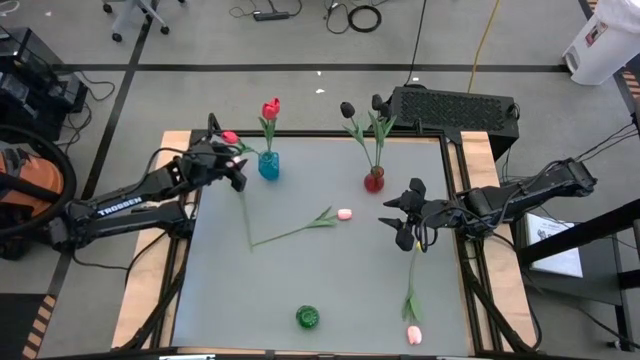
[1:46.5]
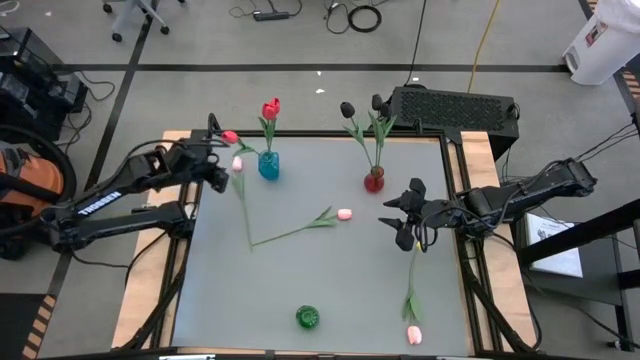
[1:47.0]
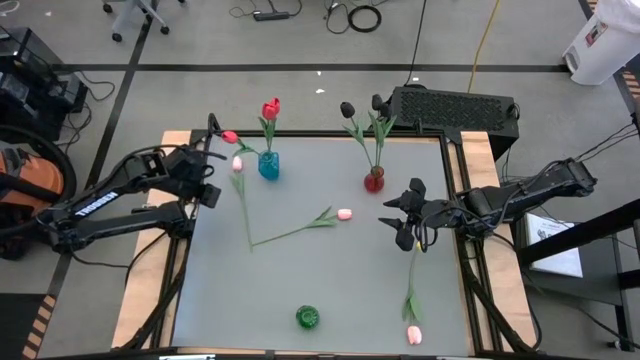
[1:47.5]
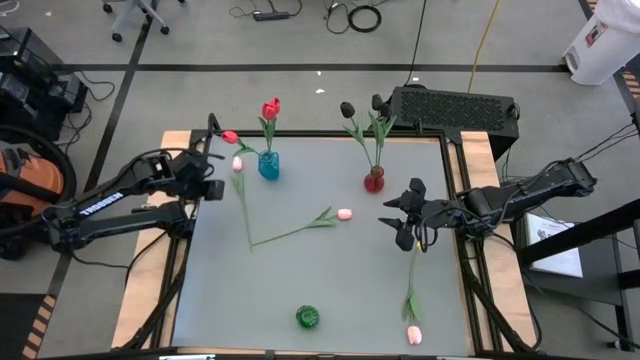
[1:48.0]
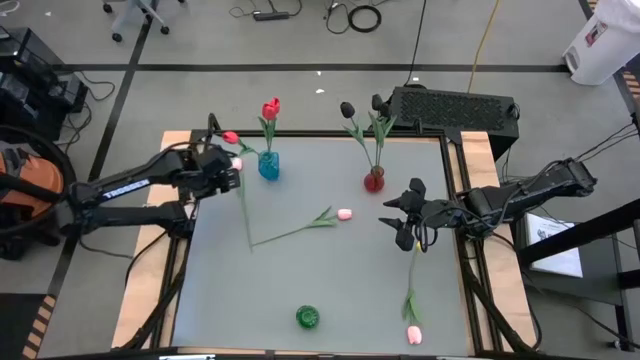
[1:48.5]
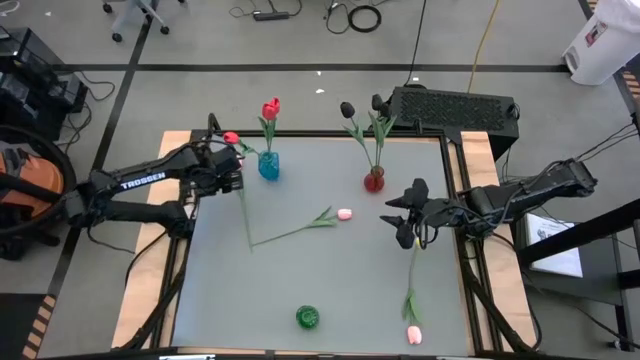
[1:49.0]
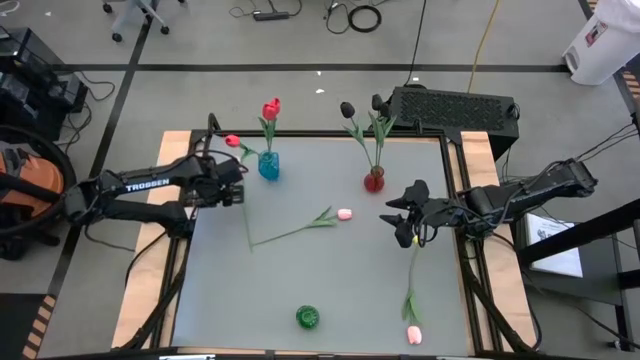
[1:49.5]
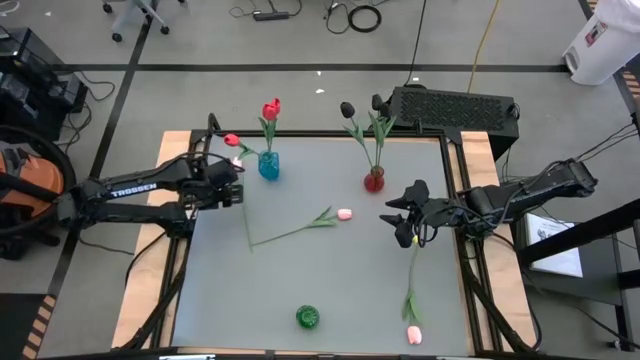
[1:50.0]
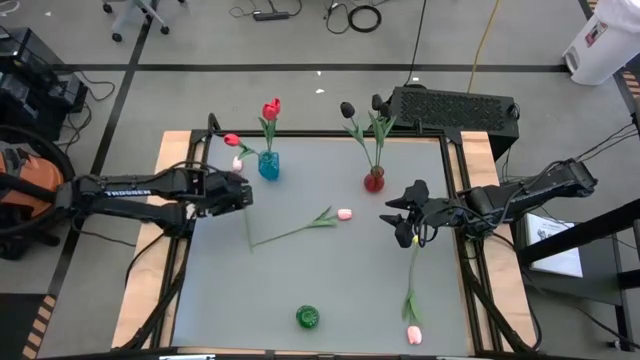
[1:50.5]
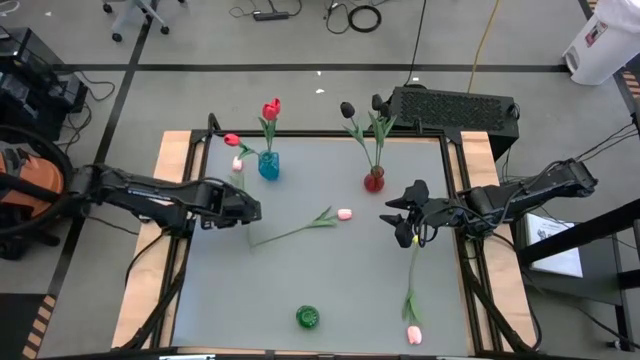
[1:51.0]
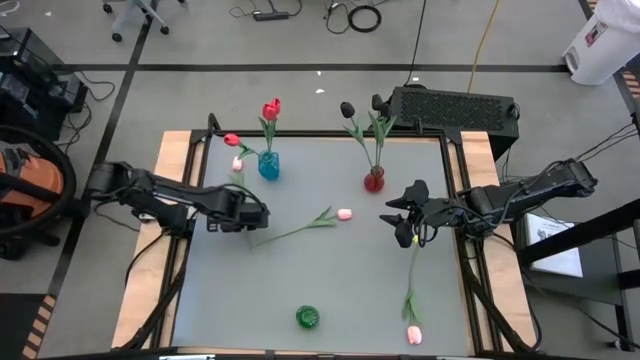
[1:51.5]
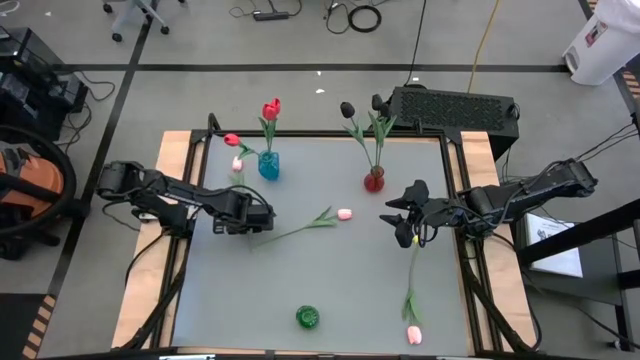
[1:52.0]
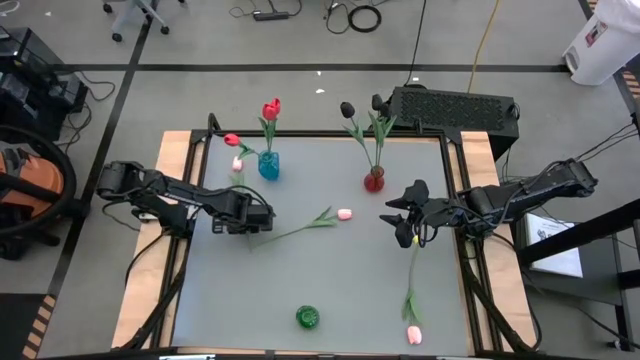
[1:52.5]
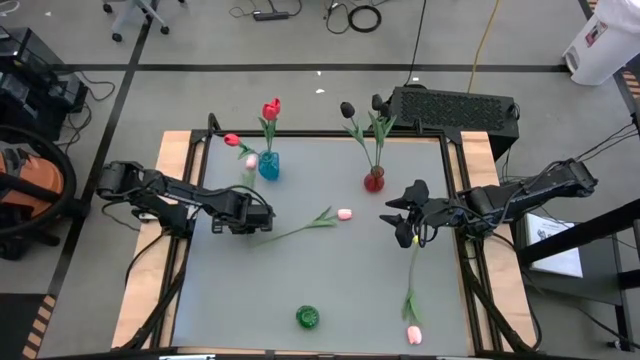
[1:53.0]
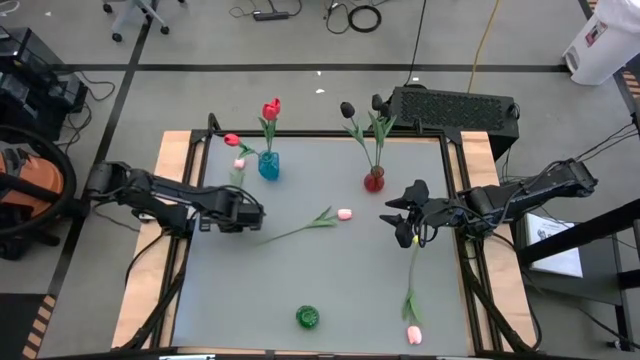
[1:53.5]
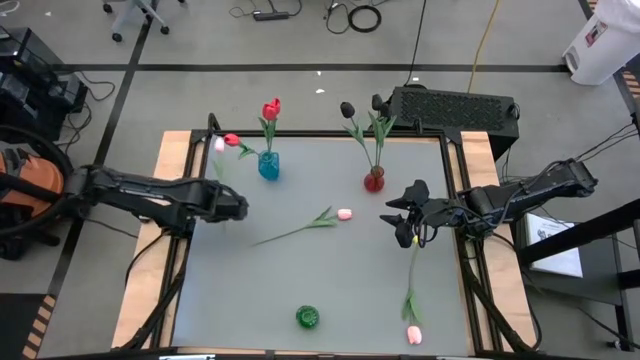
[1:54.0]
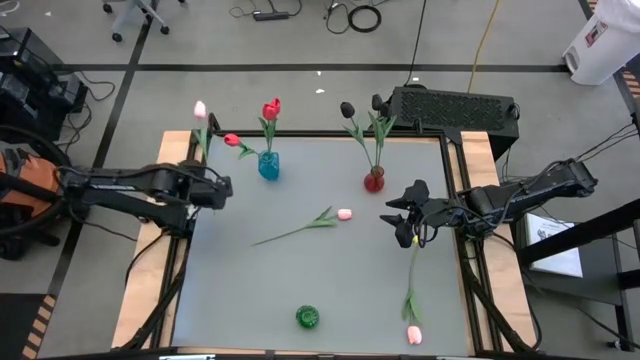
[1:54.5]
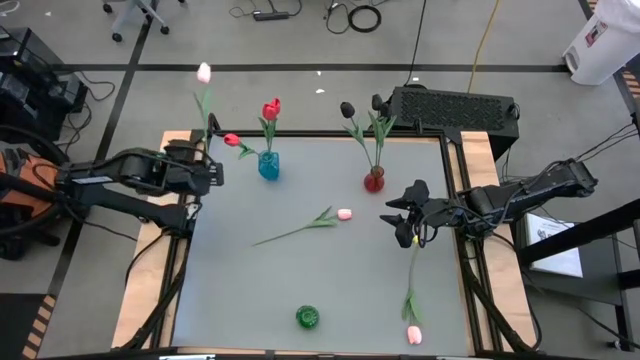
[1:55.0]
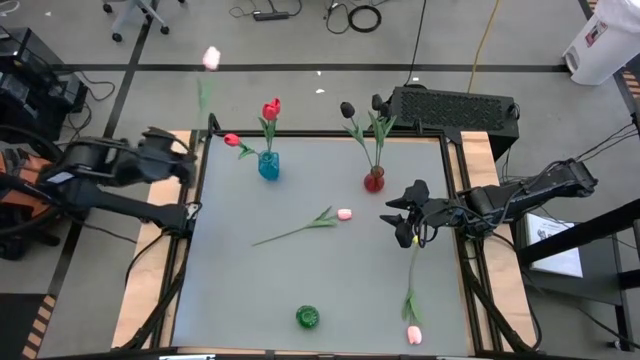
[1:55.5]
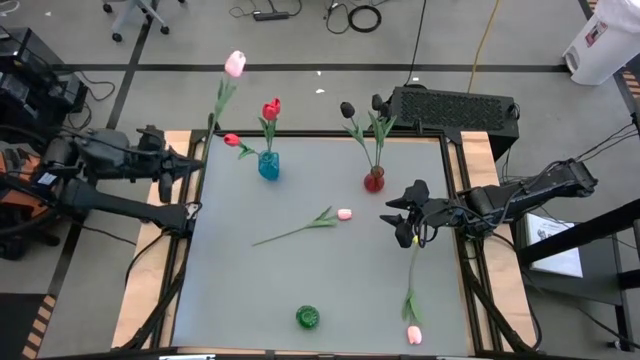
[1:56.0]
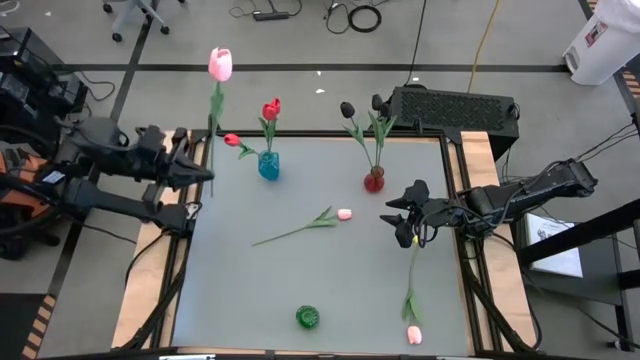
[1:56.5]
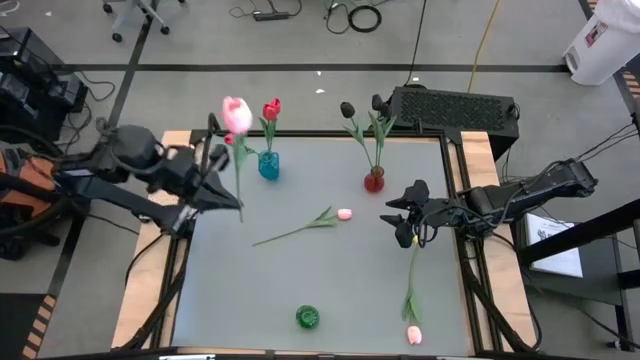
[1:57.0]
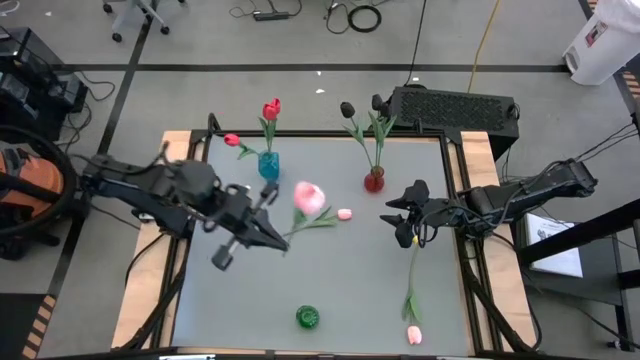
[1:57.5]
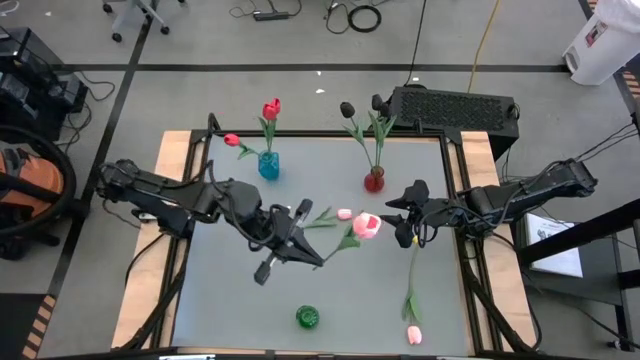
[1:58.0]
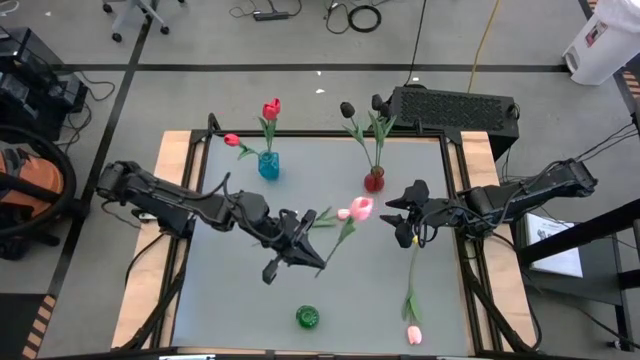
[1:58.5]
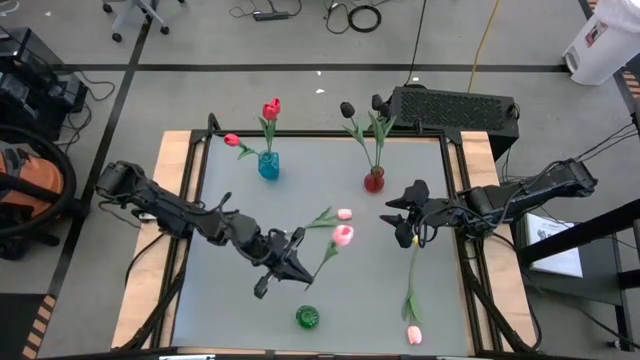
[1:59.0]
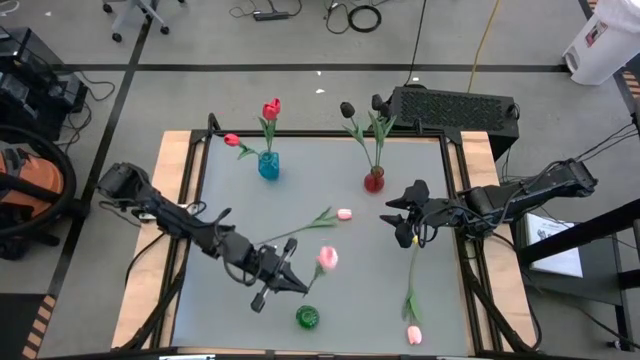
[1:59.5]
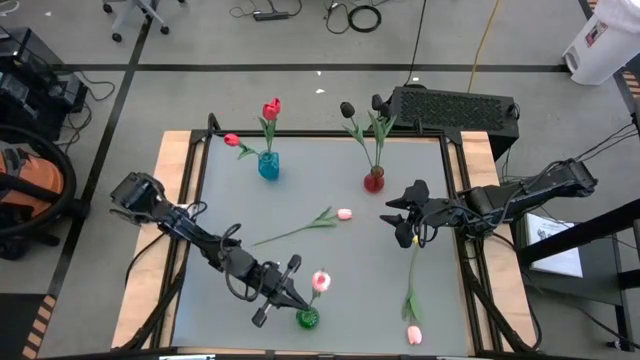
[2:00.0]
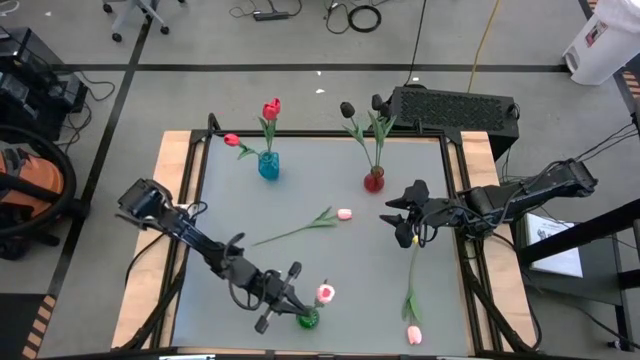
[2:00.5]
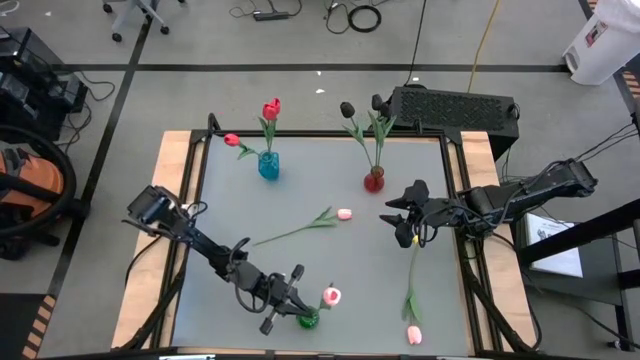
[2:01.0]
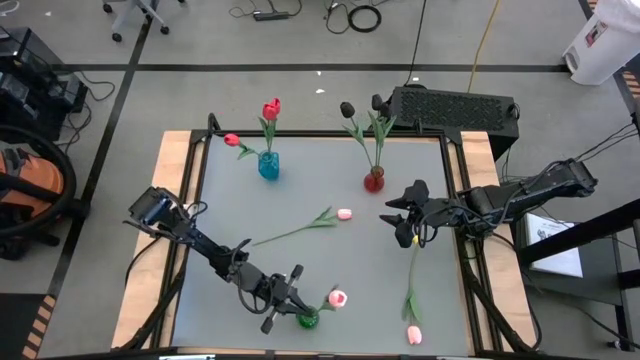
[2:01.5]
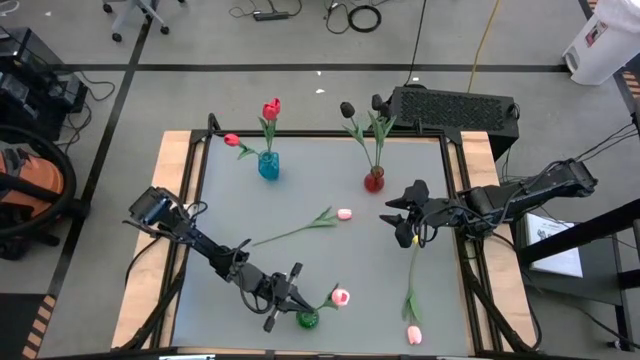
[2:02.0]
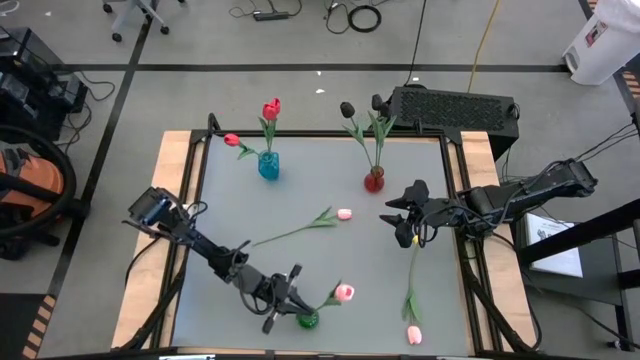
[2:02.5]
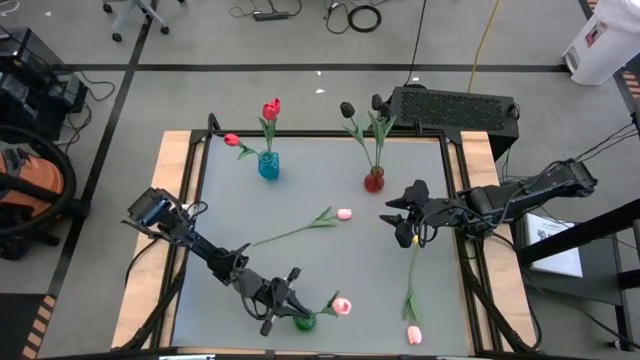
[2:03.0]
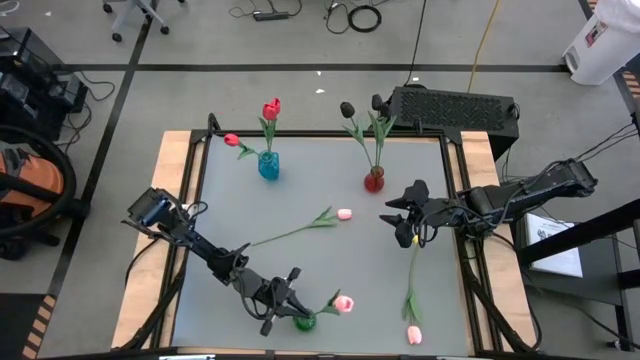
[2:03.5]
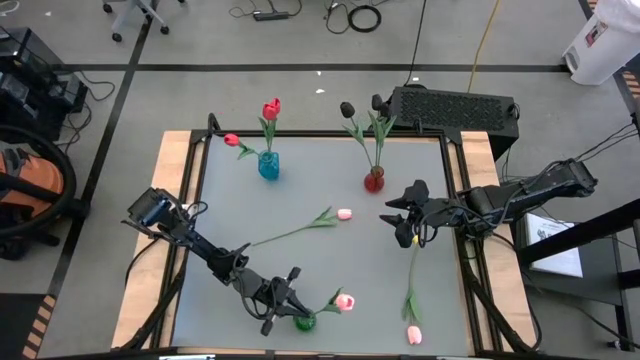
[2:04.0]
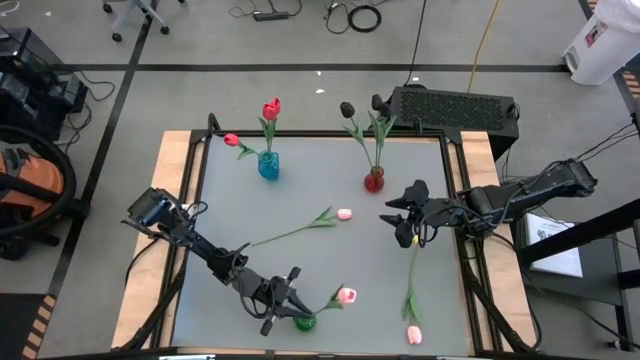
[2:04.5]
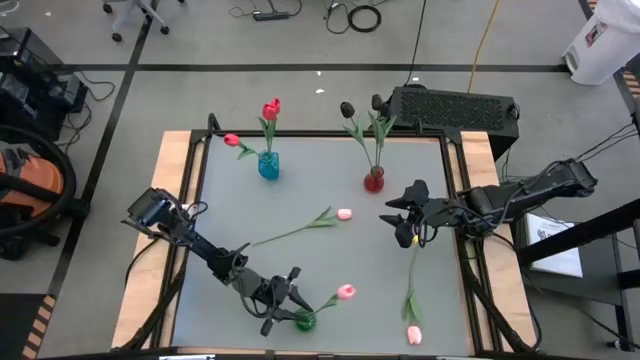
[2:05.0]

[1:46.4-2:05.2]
Task: Sort flowers into vase by color
Put the top pink tulip into the green vase

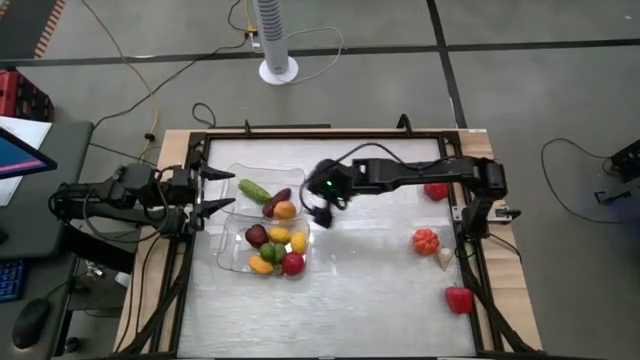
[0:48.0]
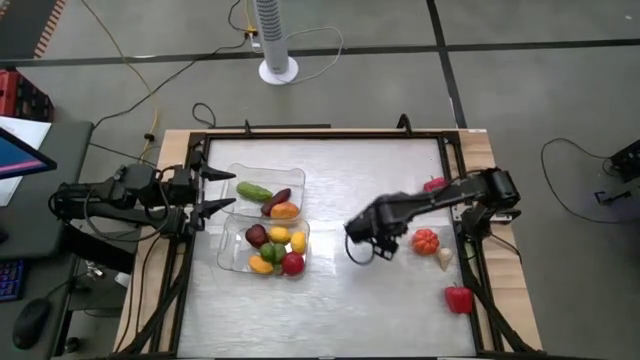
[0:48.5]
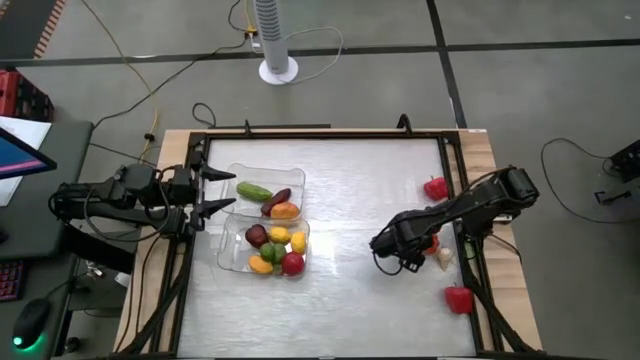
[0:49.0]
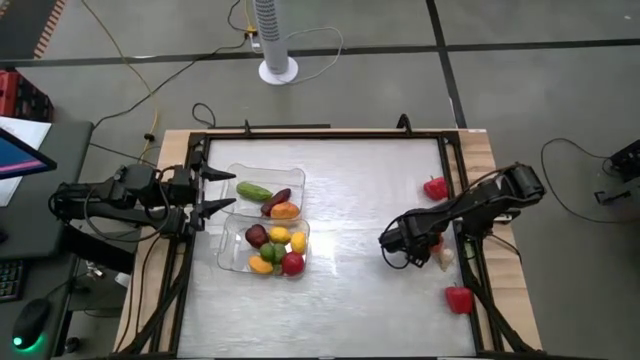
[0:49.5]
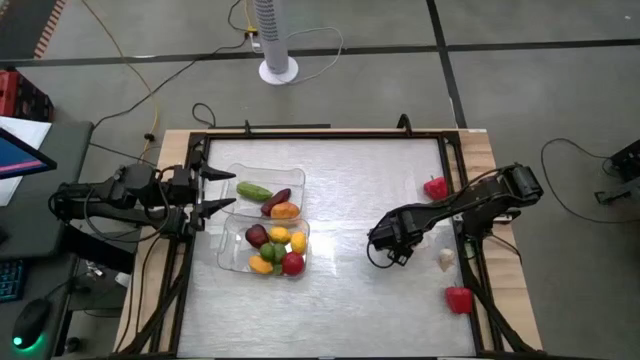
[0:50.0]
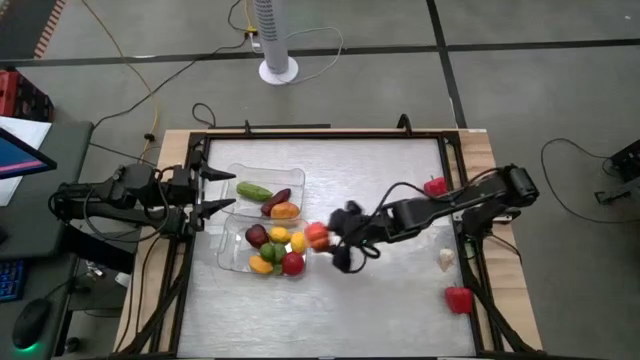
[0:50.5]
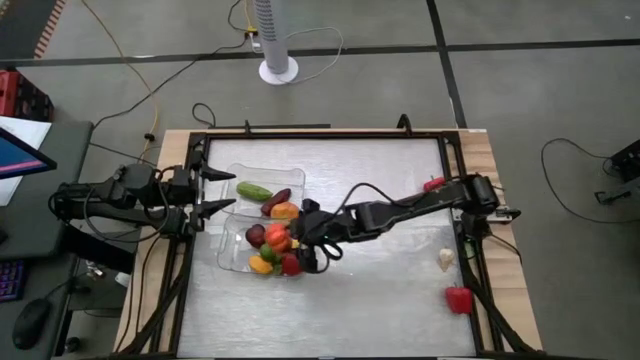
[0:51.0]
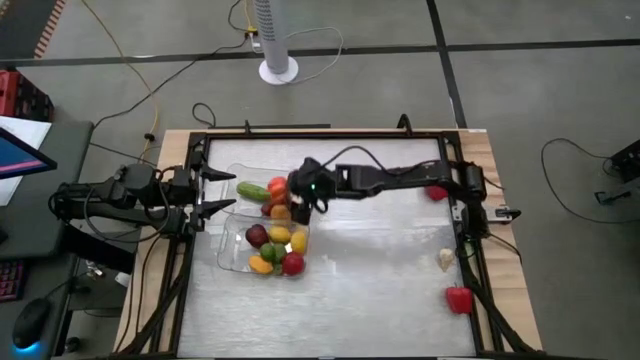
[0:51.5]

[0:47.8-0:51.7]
Task: Sort produce into baskets
Put the orange pumpkin into the top transparent bin
